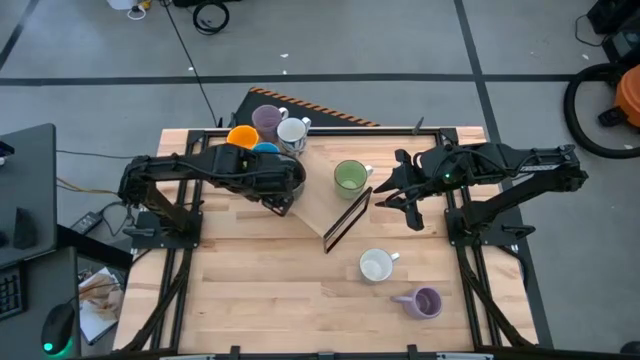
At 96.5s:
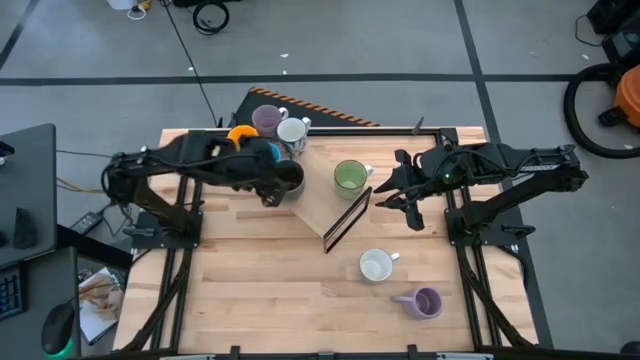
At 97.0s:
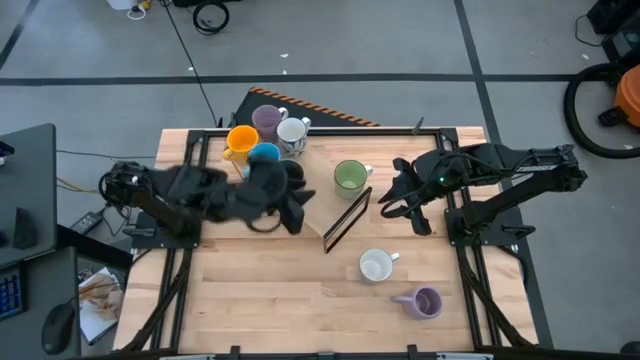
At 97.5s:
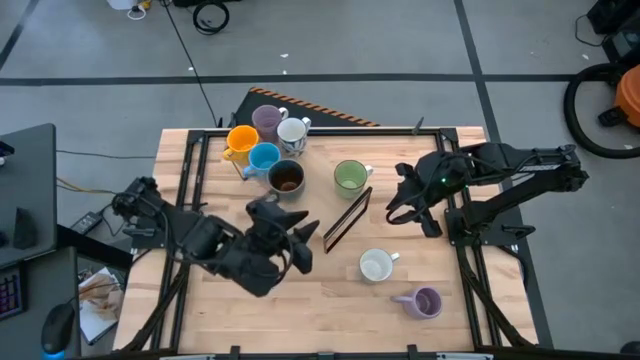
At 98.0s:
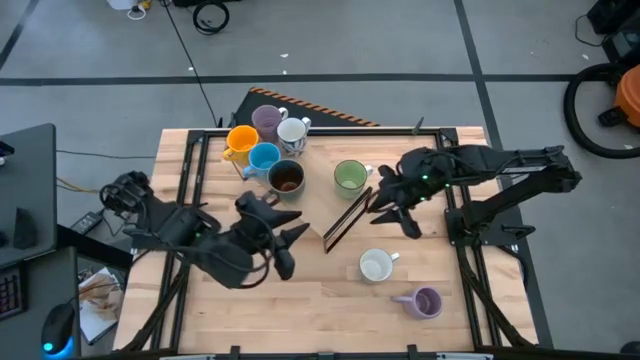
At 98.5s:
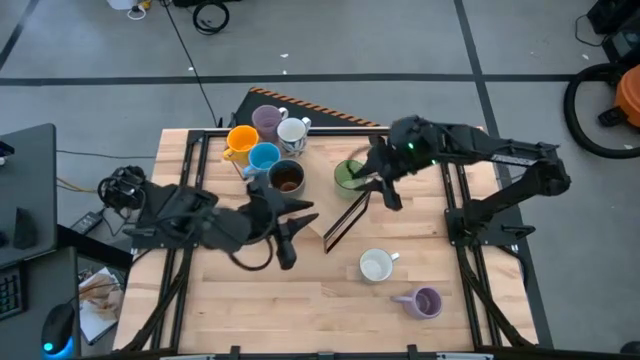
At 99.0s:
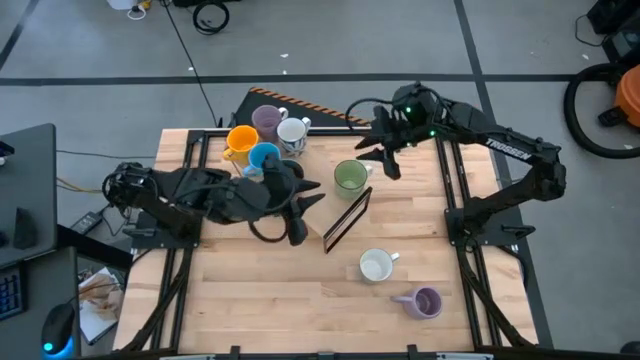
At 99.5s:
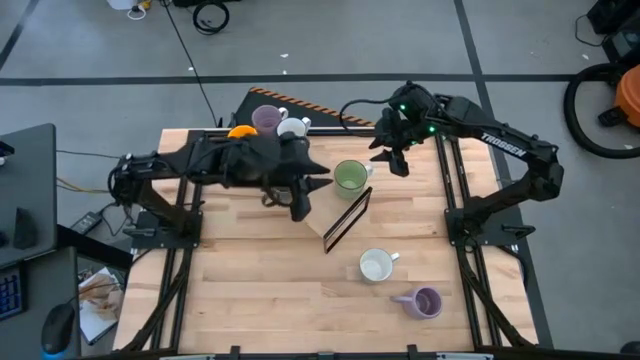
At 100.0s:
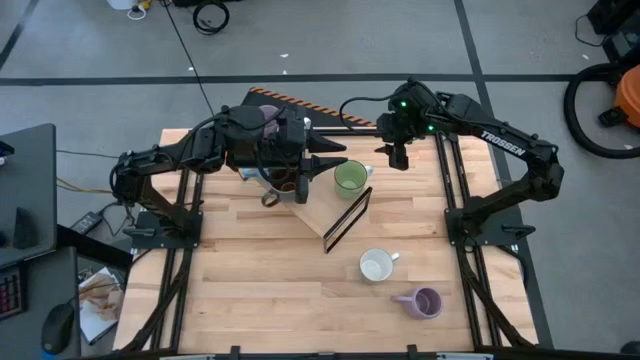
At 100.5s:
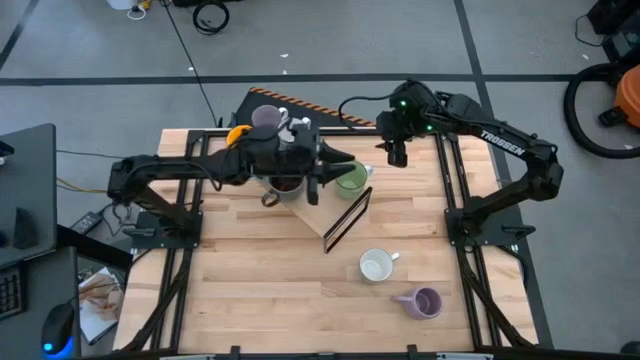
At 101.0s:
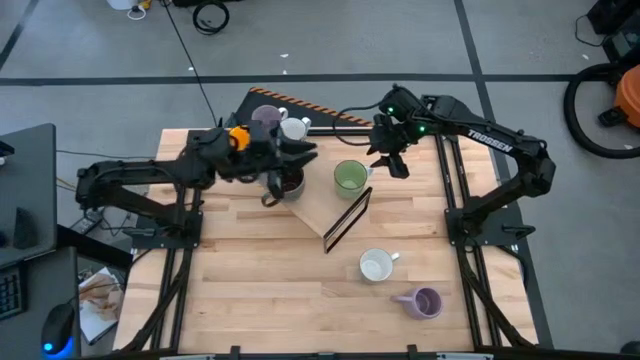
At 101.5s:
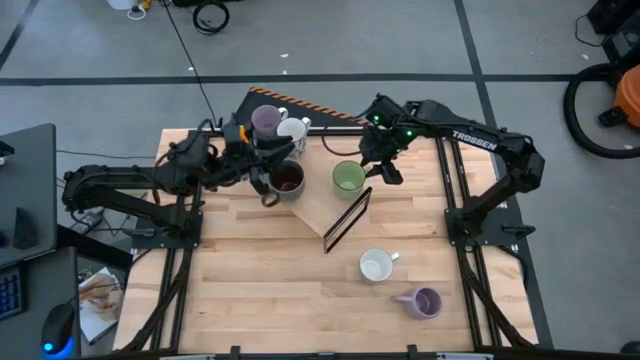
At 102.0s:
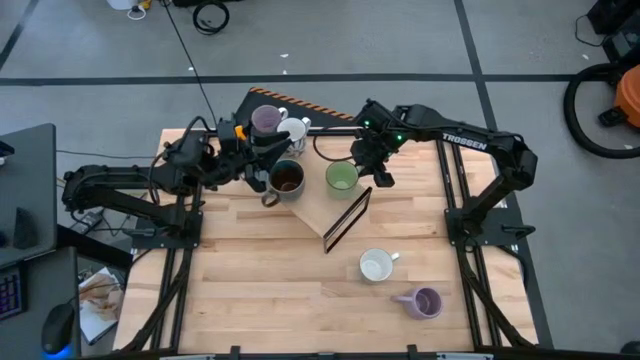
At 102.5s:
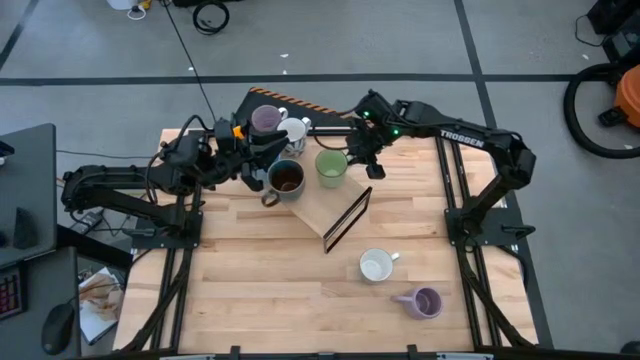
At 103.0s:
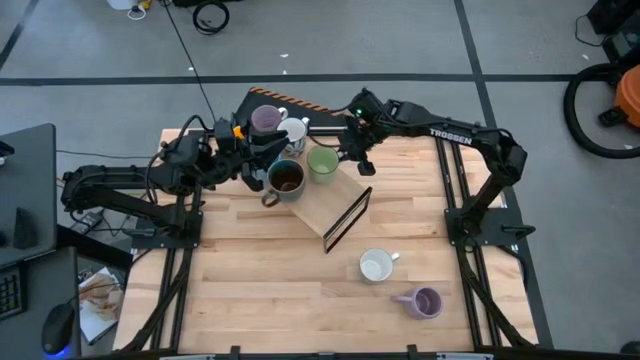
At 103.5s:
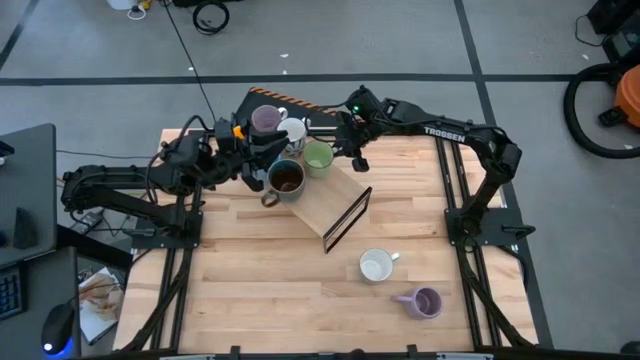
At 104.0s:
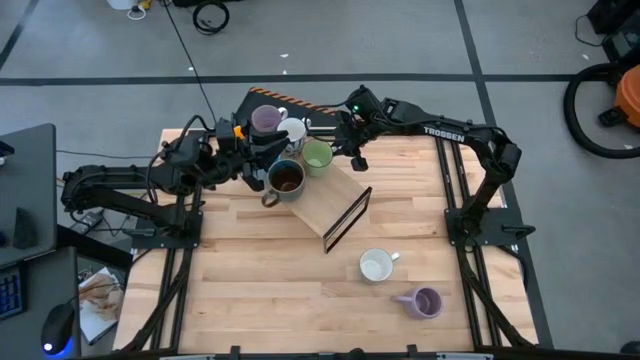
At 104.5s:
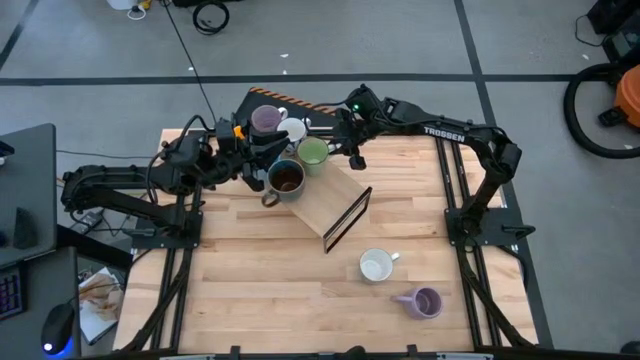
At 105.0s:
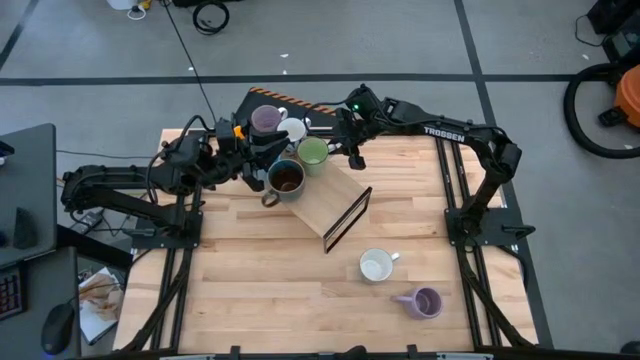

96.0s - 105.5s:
Task: Place coffee mugs
Adjust the green mug on the shelf

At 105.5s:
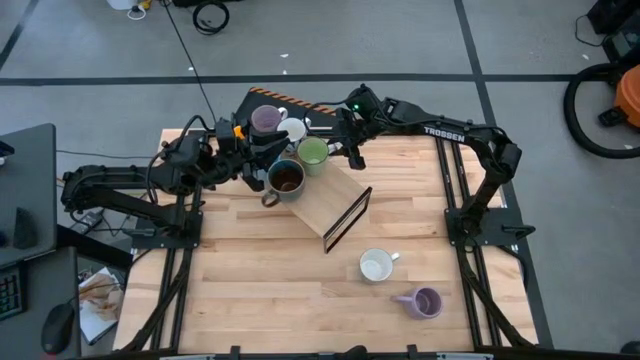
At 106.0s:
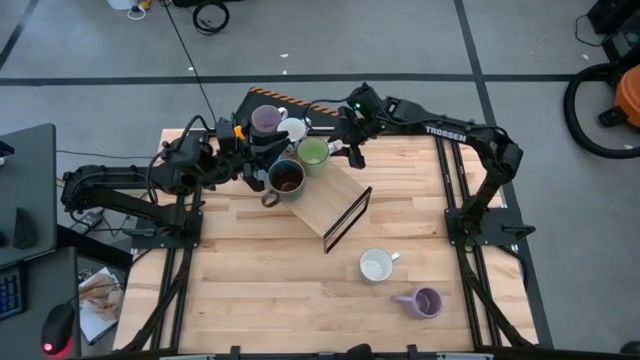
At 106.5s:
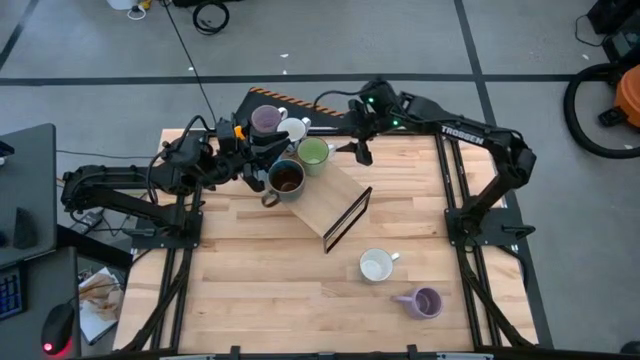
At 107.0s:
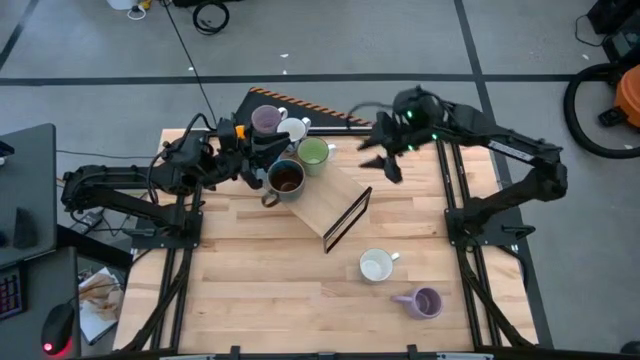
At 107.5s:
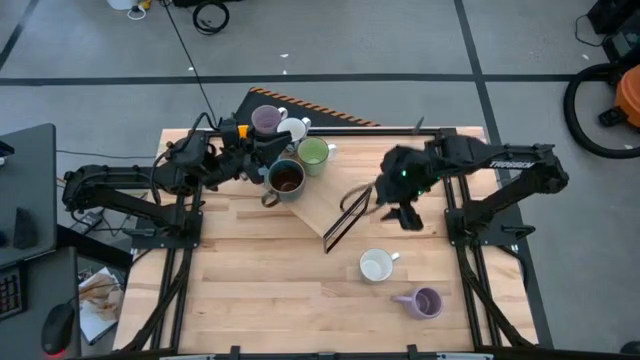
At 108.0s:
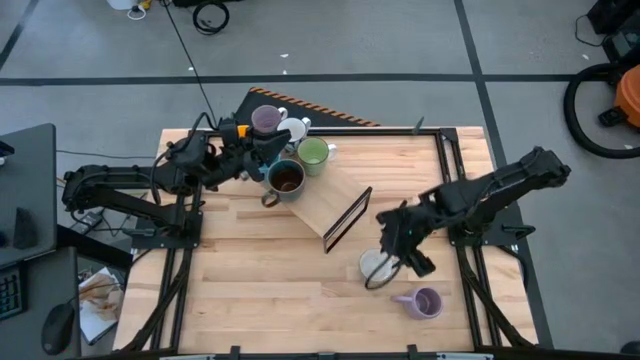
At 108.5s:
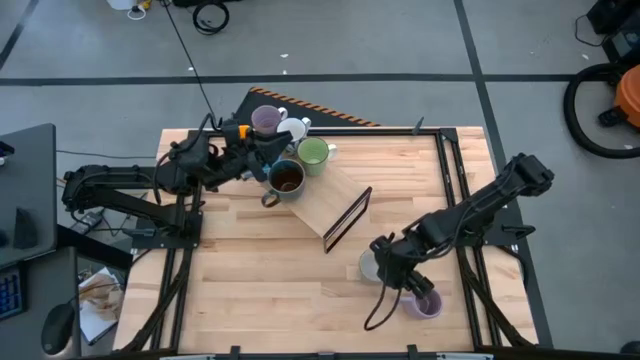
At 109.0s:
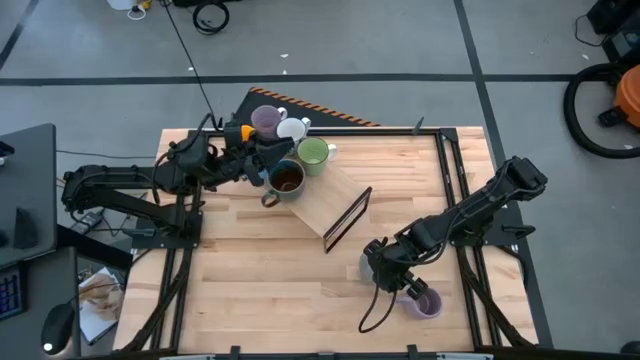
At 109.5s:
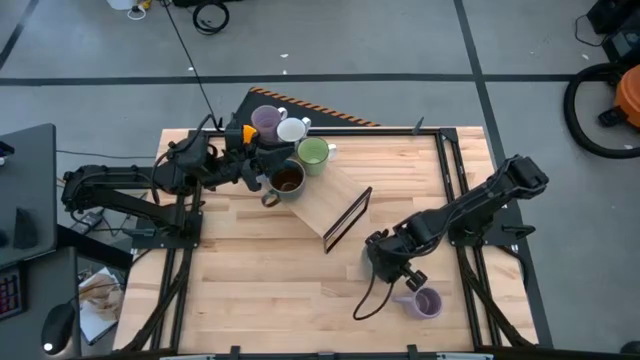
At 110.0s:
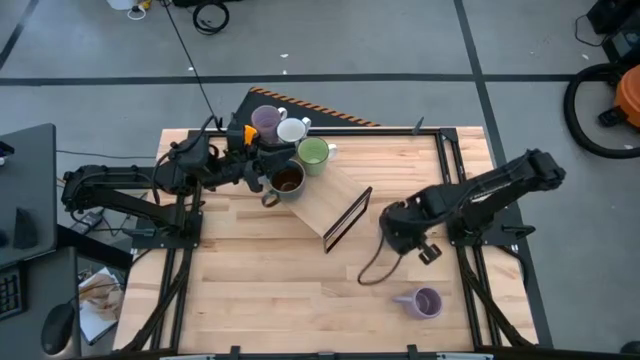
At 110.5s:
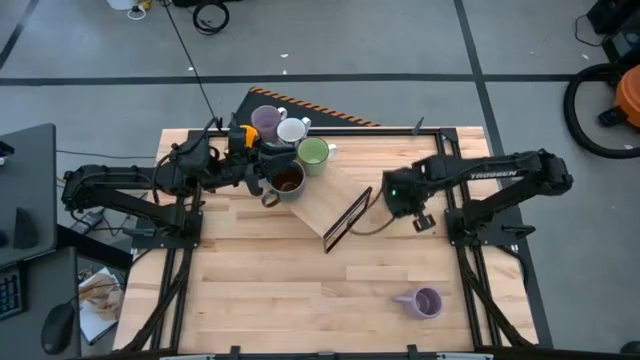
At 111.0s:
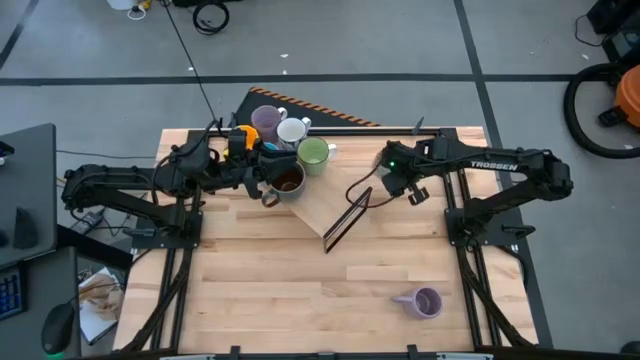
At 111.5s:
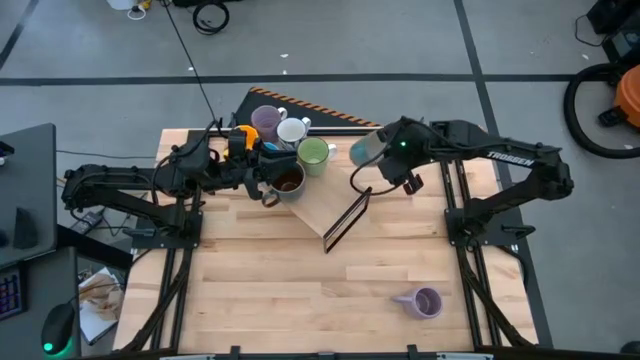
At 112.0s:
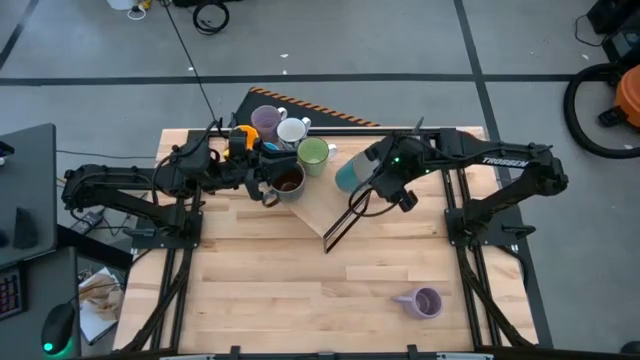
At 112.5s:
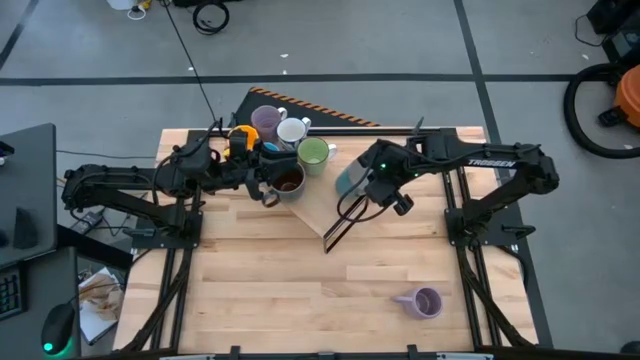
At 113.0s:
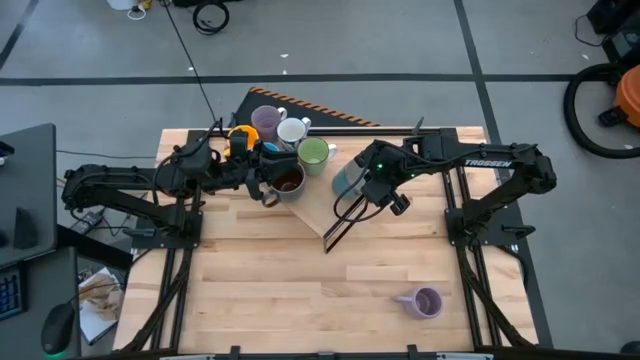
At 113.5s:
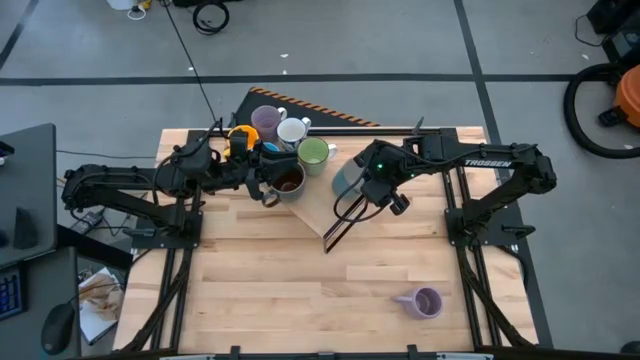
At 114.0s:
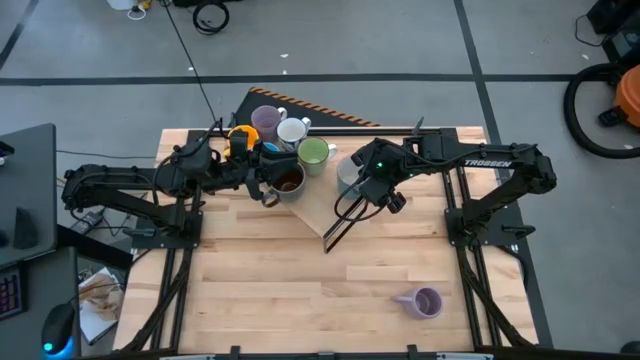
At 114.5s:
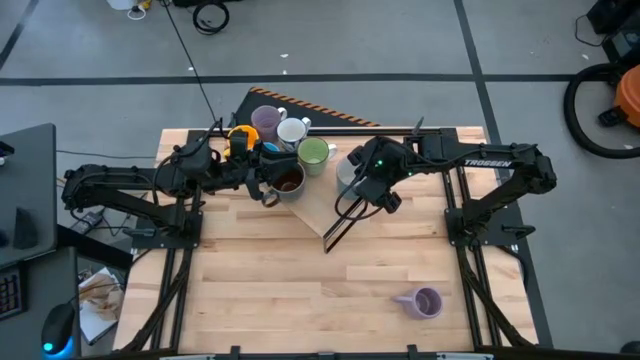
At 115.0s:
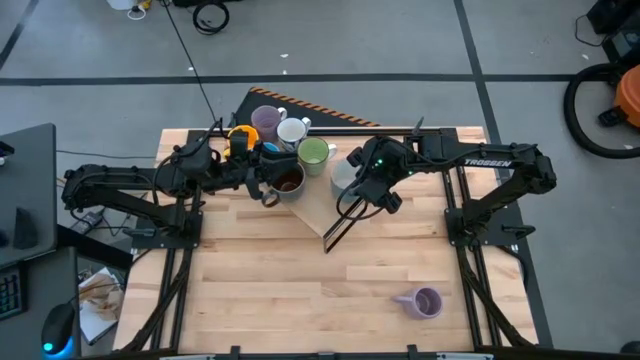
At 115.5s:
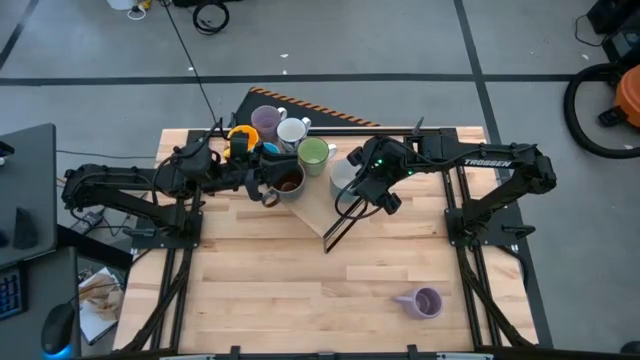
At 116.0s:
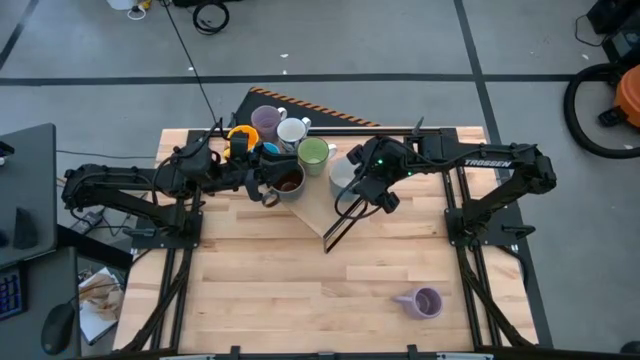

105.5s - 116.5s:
Put the blue mug on the shelf
